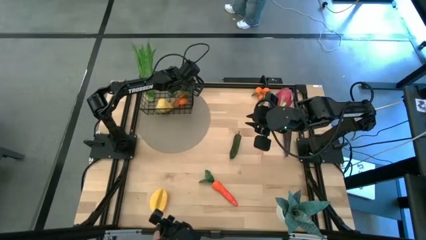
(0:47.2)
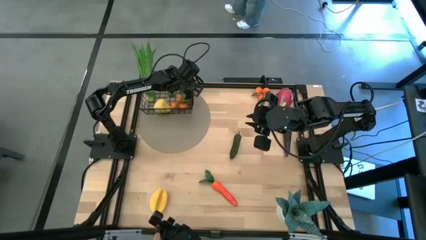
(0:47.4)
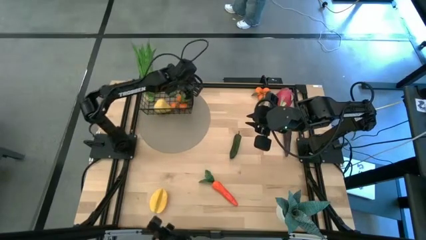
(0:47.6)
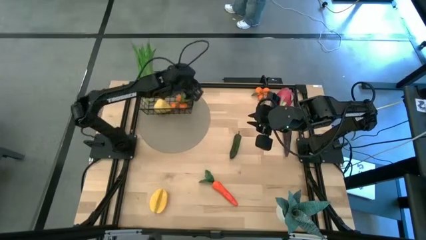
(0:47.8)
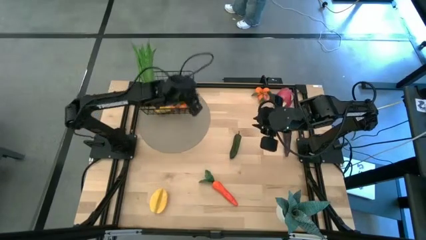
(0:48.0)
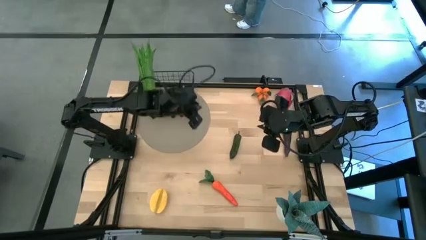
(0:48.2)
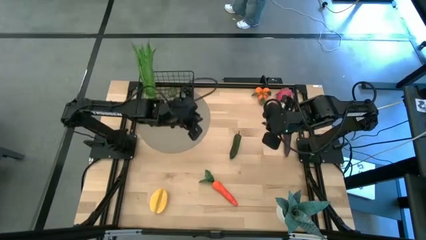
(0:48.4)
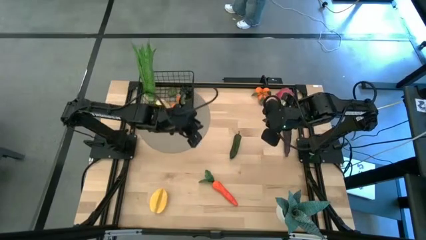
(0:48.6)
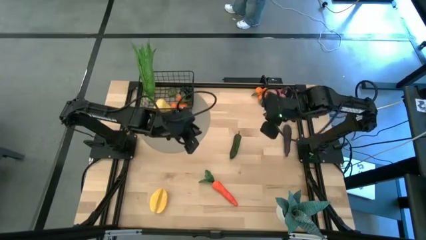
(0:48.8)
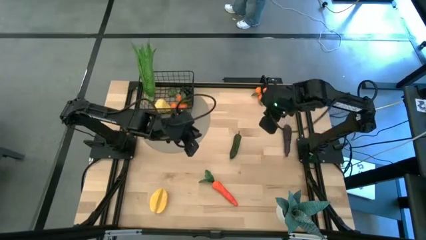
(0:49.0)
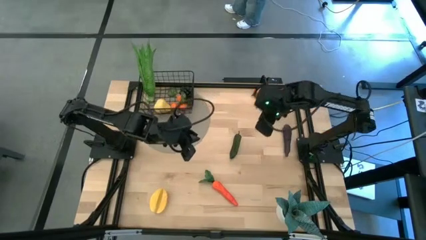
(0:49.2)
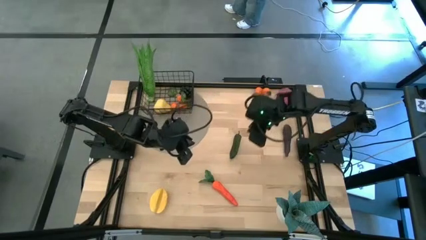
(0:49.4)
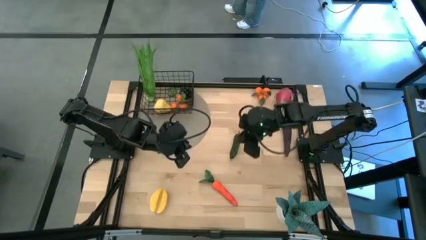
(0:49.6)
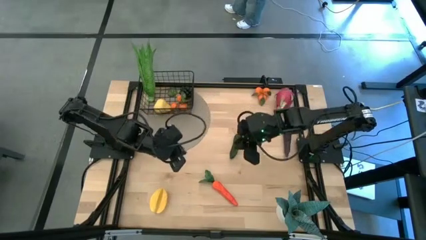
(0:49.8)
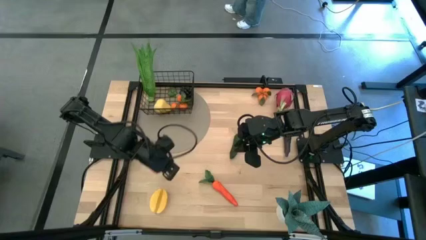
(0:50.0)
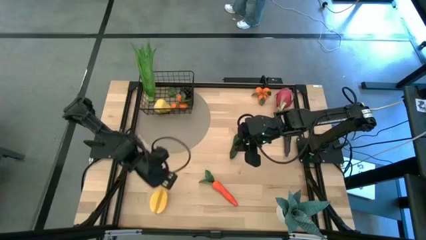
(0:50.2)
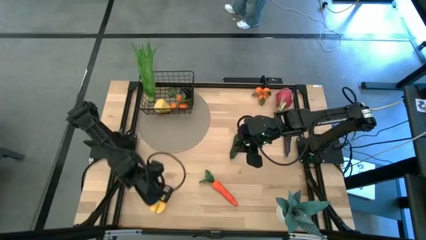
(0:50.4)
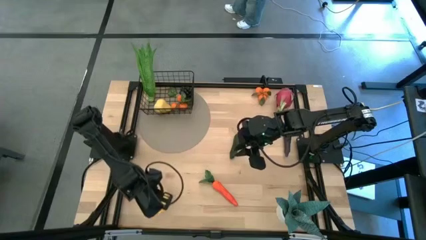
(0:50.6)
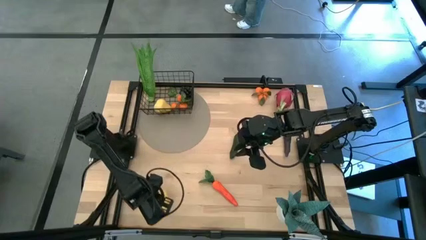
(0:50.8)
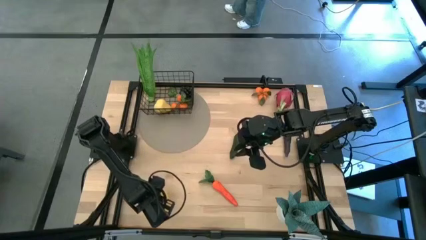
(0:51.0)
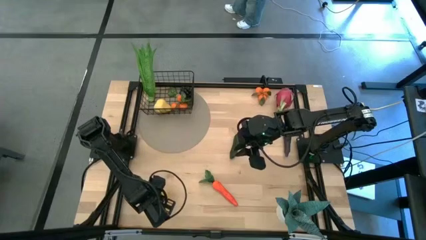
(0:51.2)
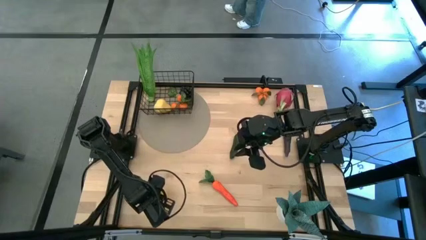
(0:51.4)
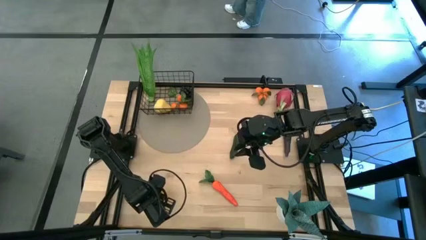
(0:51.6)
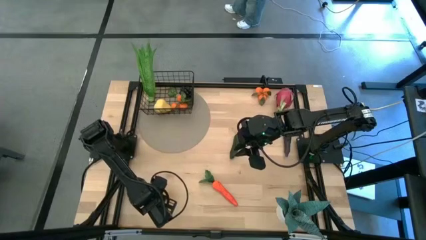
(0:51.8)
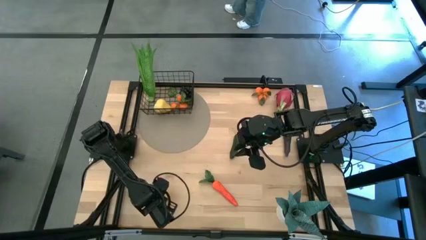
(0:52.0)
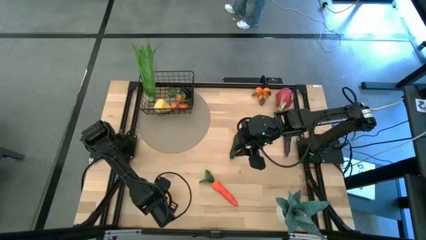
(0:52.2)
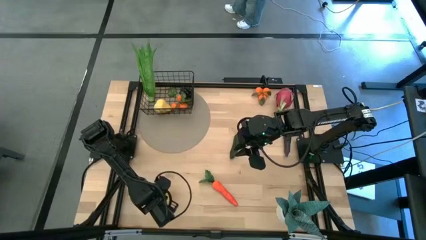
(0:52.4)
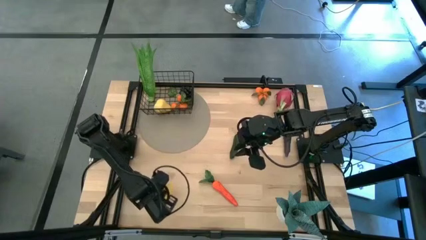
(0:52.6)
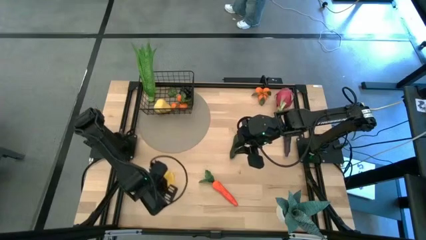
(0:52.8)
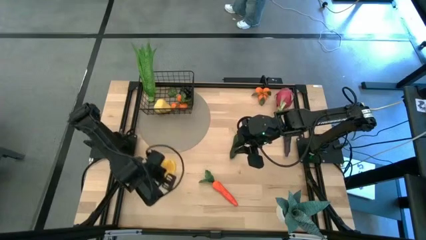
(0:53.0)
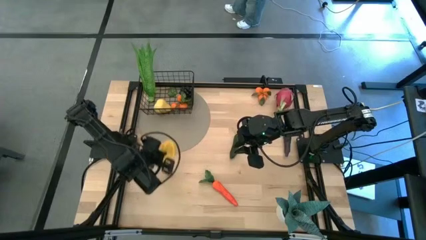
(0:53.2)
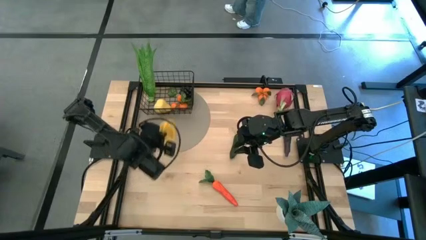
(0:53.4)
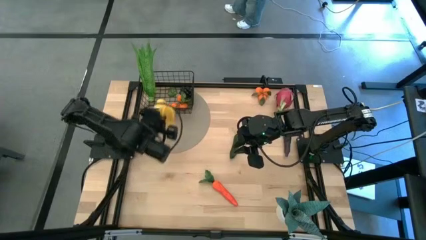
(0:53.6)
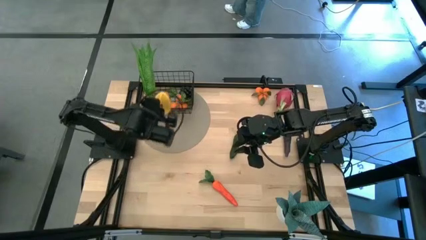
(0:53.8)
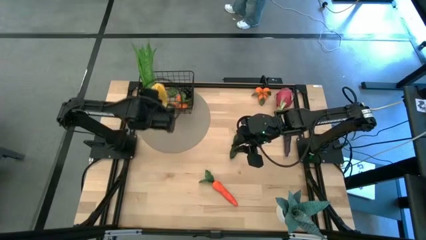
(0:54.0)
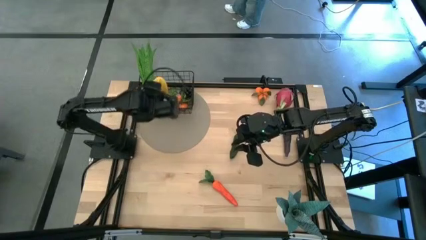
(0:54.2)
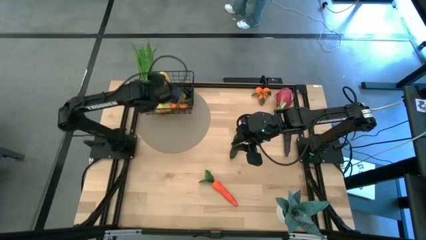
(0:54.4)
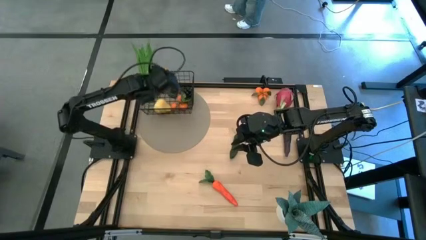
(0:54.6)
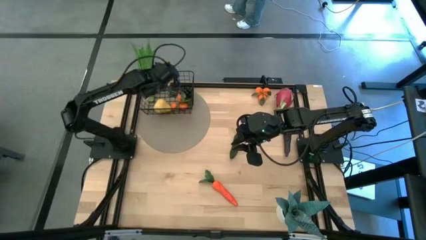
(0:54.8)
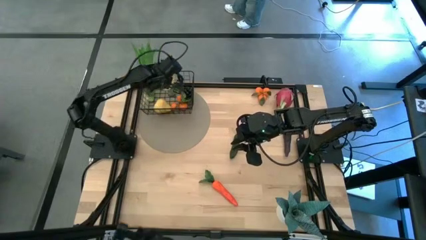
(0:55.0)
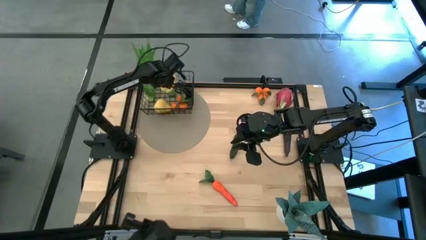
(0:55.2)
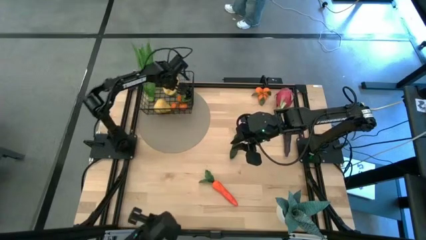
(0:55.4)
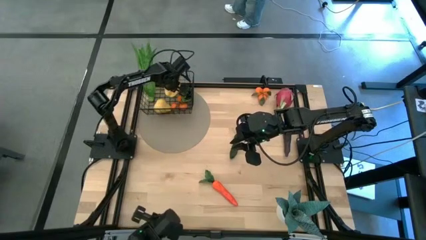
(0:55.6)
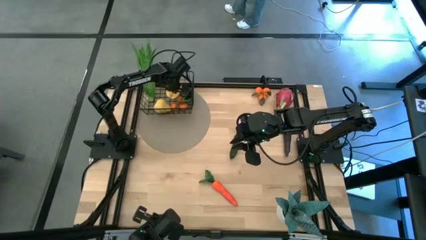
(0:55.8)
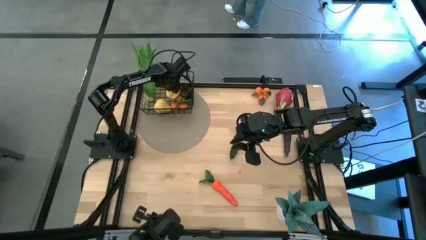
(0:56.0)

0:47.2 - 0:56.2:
Task: Build produce basket
Put the yellow starfruit into the wire basket

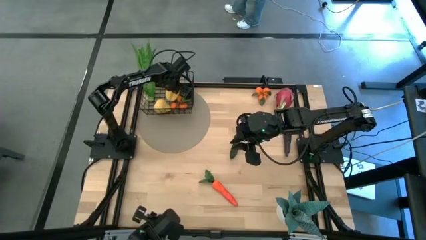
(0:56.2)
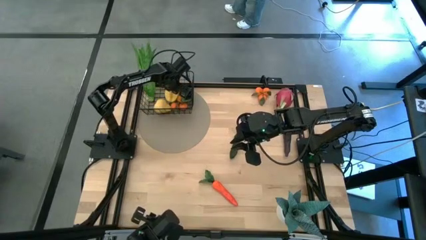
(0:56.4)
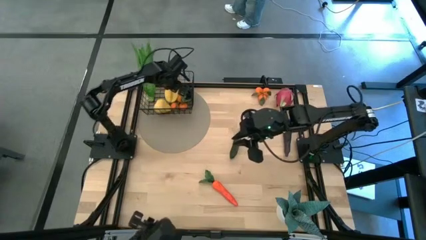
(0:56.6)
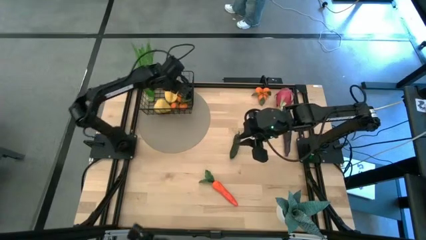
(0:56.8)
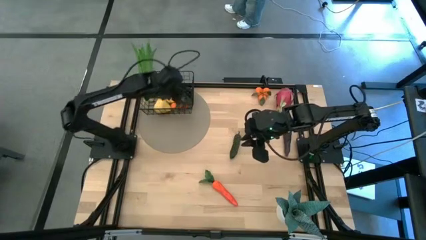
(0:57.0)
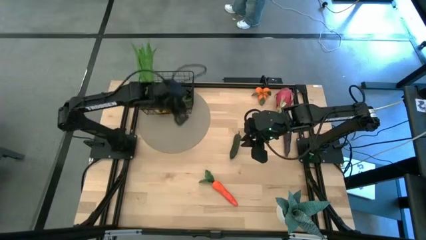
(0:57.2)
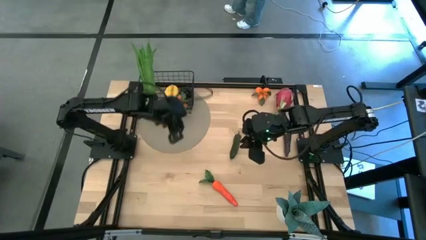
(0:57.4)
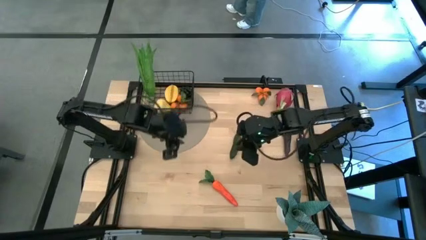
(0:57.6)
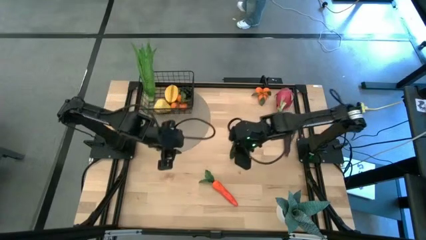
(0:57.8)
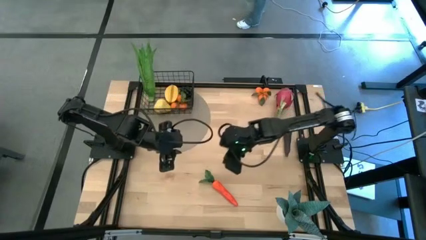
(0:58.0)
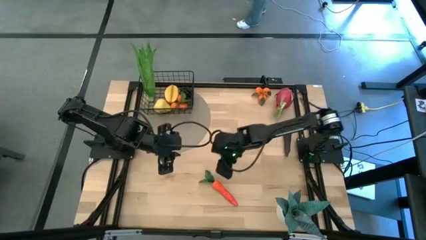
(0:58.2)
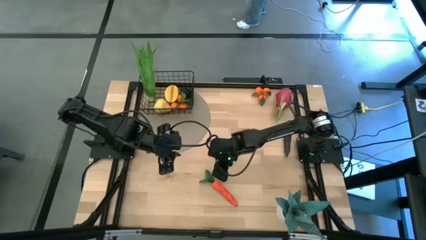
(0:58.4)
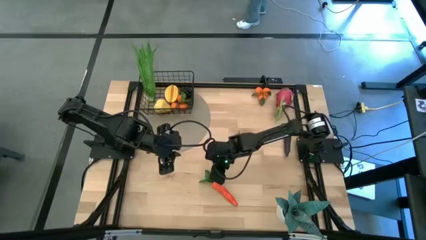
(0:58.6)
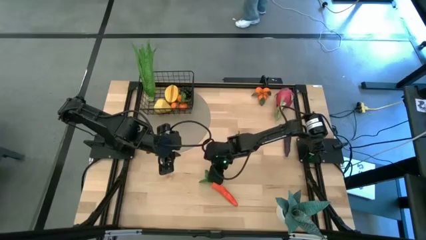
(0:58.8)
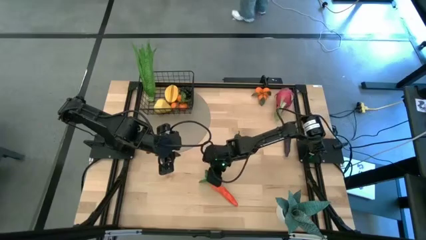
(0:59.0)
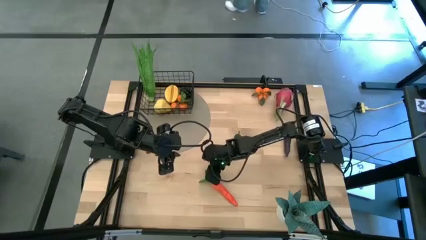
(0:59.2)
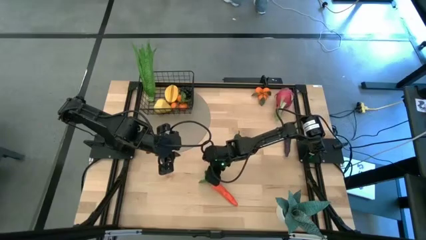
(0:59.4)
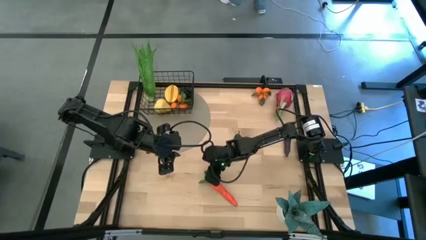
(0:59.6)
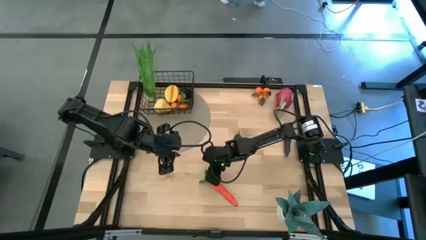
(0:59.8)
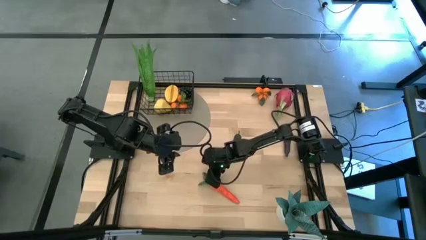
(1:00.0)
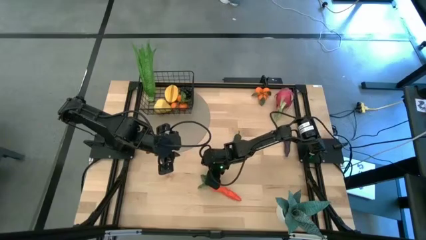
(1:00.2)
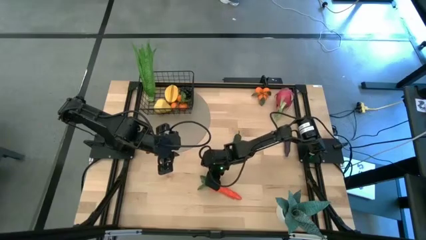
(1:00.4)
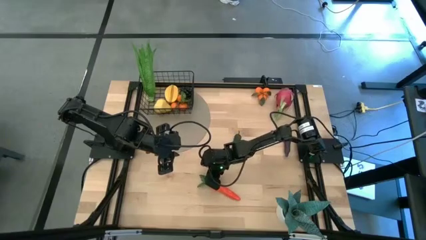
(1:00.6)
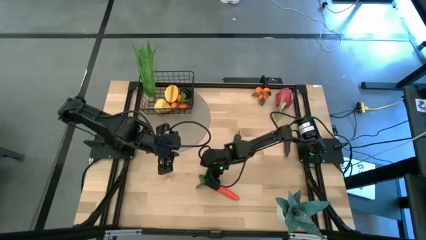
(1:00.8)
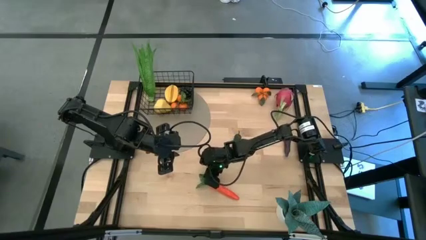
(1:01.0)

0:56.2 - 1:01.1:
Put the orange carrot into the wire basket
